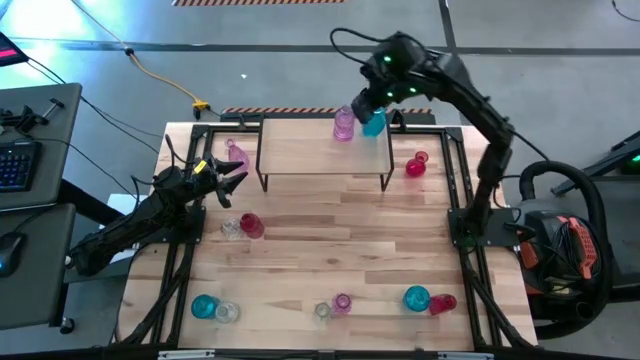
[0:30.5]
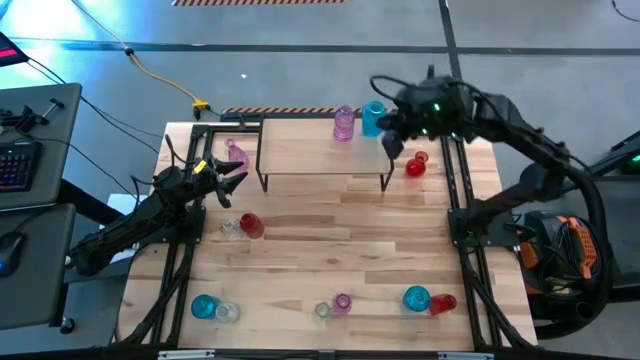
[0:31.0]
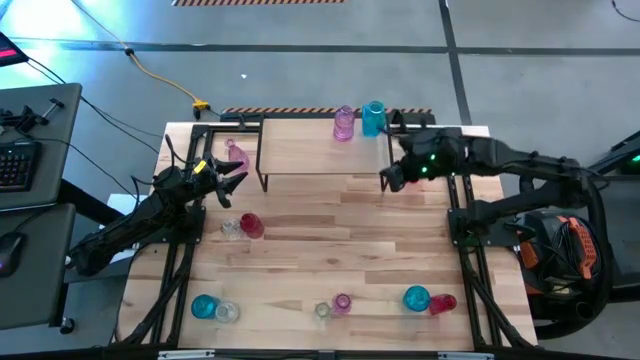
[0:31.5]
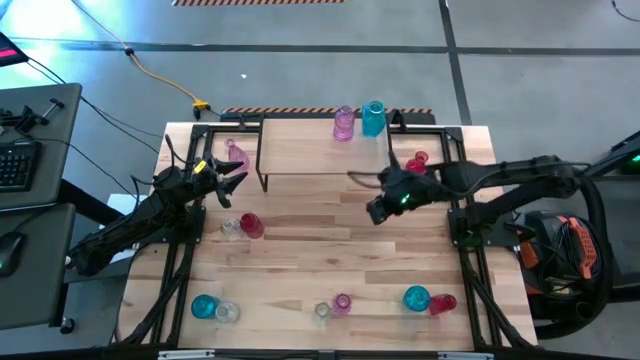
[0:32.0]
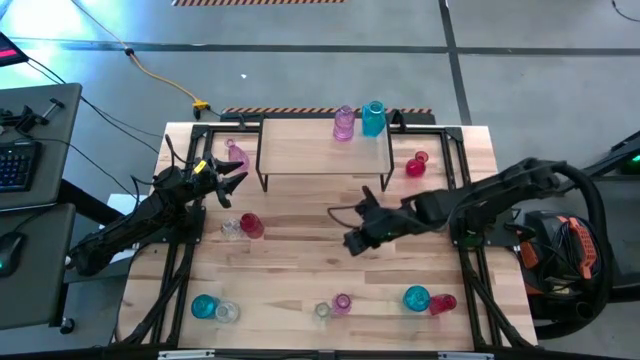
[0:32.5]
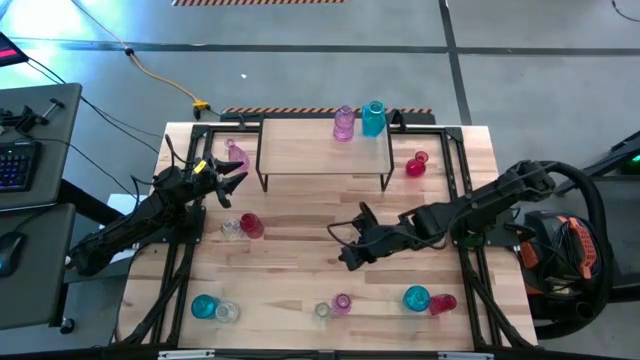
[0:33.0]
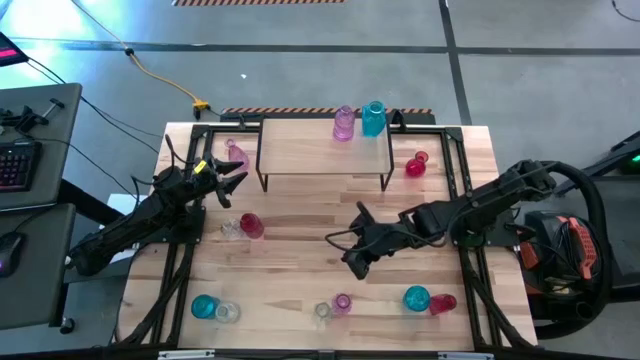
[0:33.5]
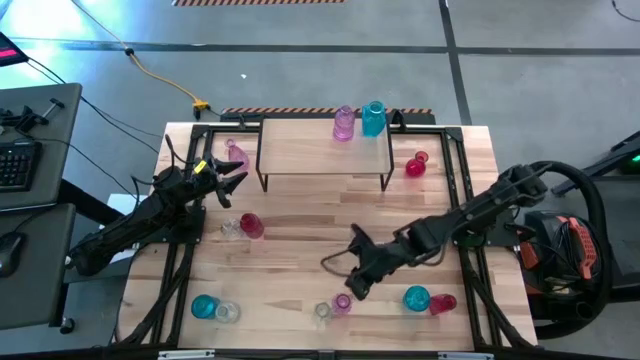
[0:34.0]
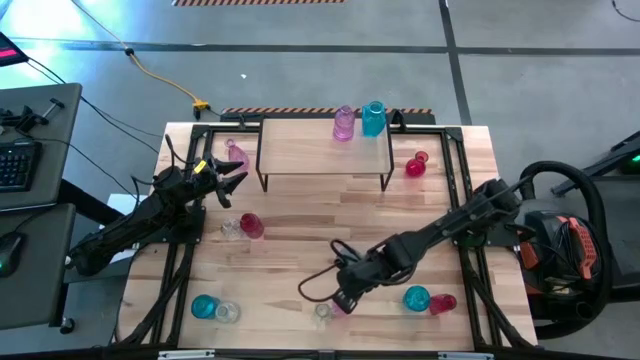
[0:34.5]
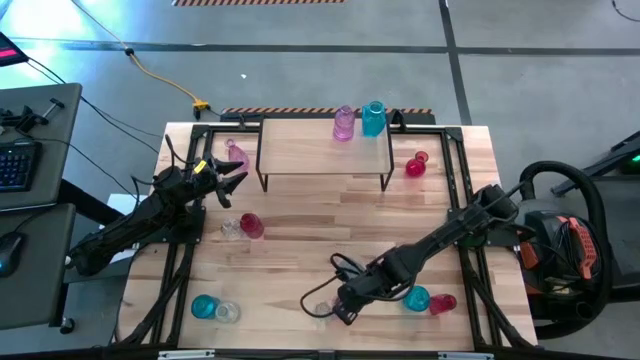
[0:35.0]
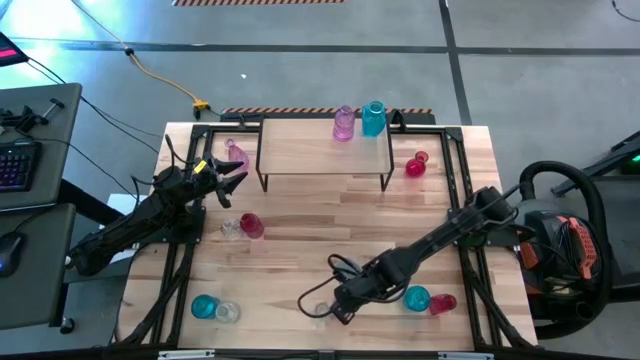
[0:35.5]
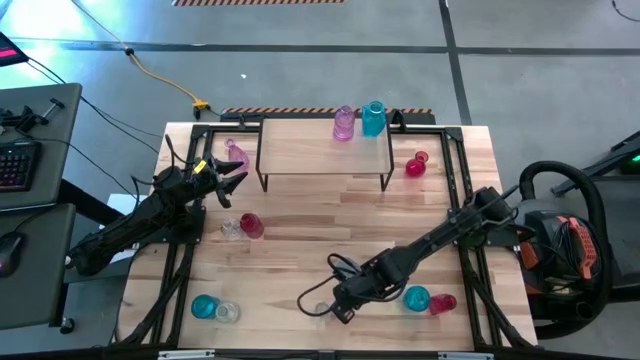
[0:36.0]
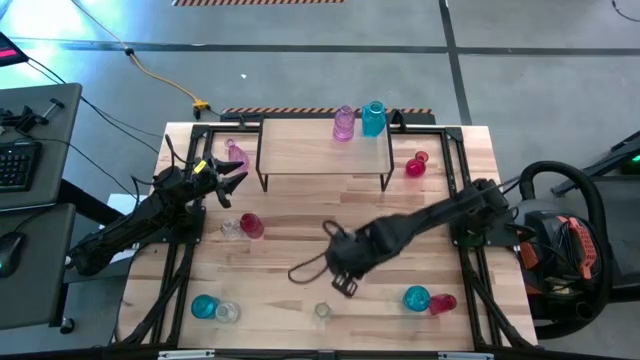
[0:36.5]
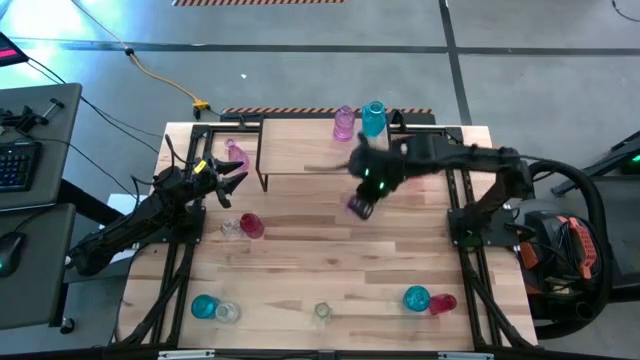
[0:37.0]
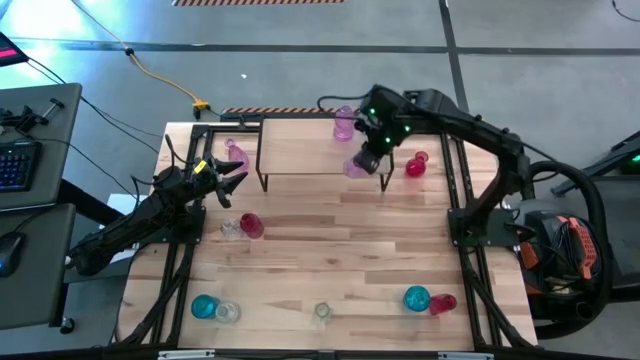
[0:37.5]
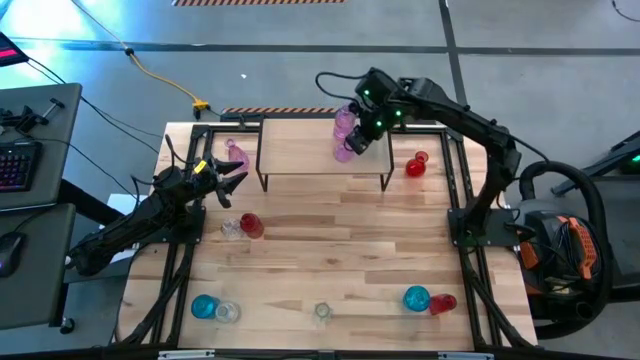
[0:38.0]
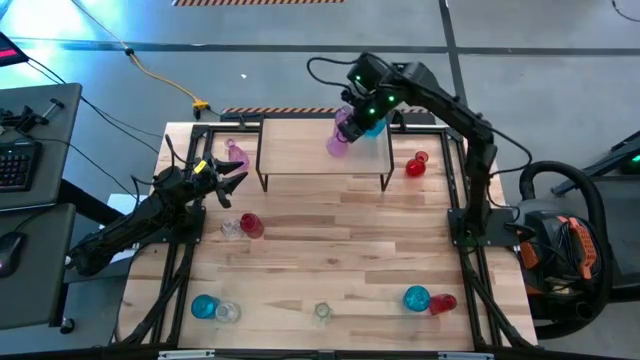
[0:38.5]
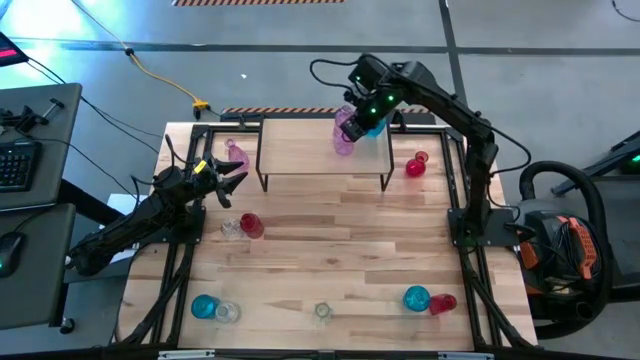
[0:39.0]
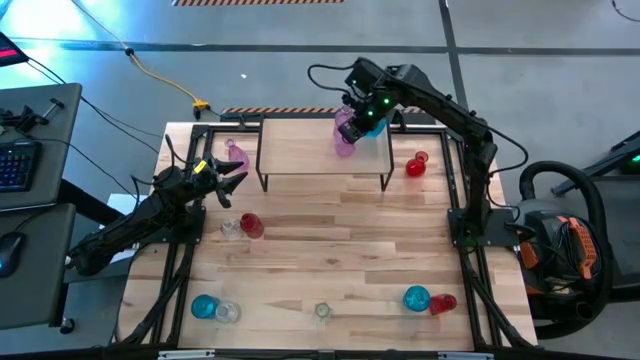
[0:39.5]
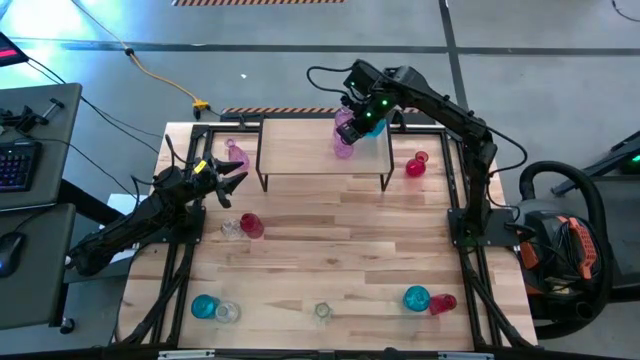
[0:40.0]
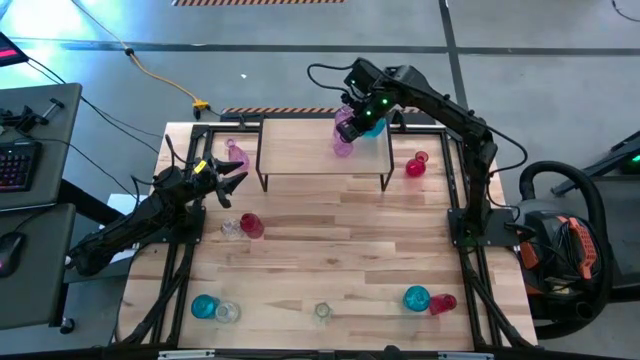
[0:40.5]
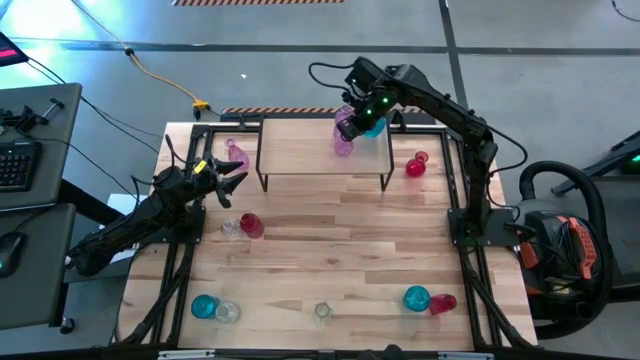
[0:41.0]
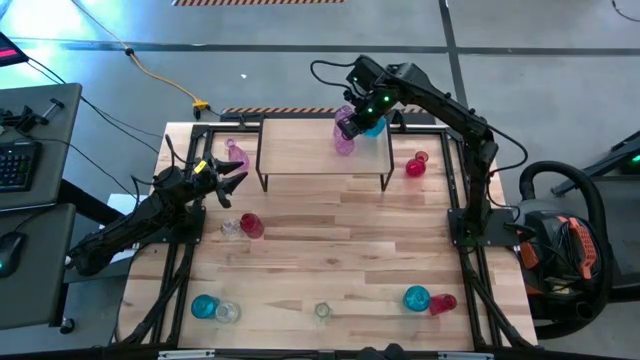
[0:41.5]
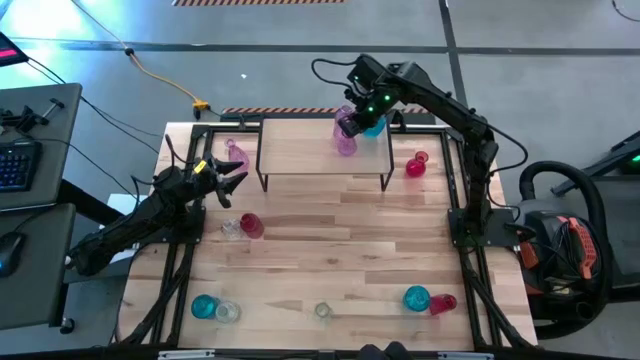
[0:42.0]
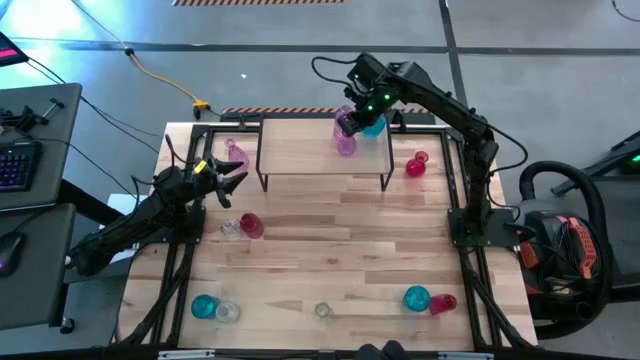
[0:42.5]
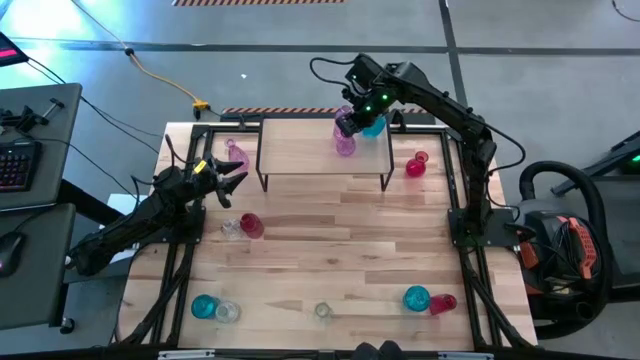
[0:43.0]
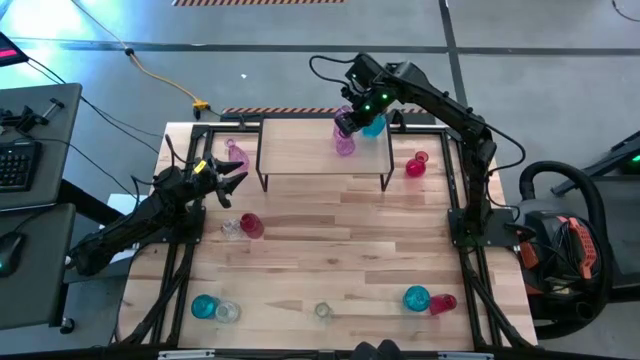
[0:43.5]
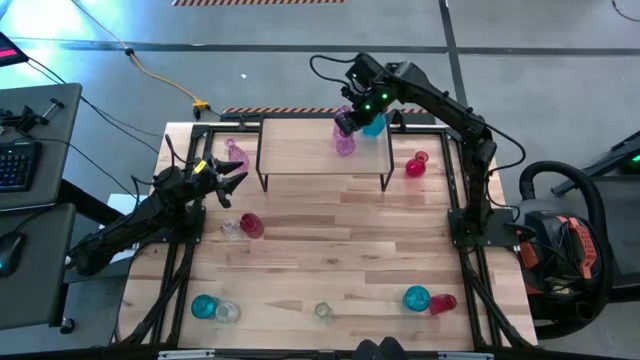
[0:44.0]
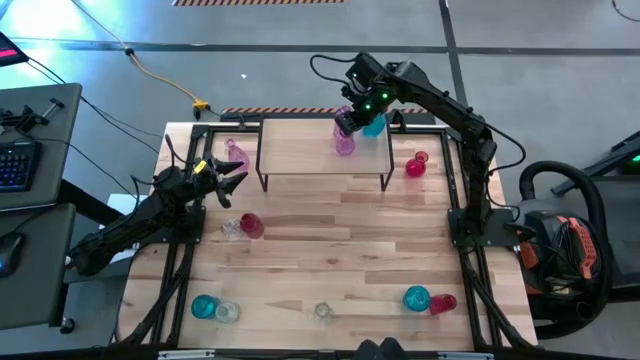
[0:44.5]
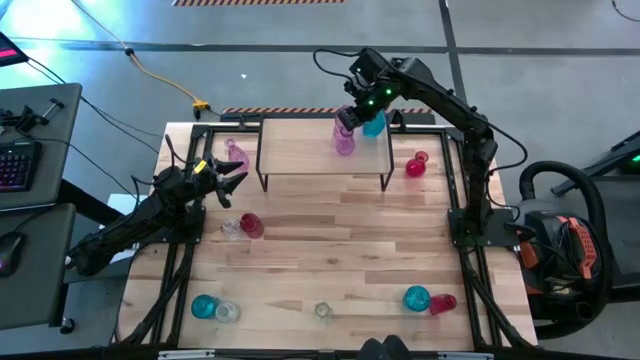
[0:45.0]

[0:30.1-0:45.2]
Task: sort vases onto shelf
Put the bottom violet vase on the shelf aligned with the other violet vase

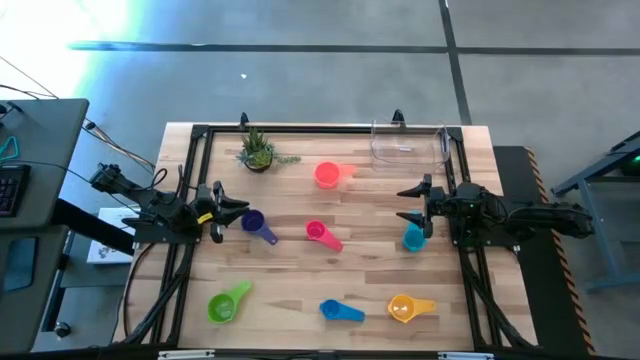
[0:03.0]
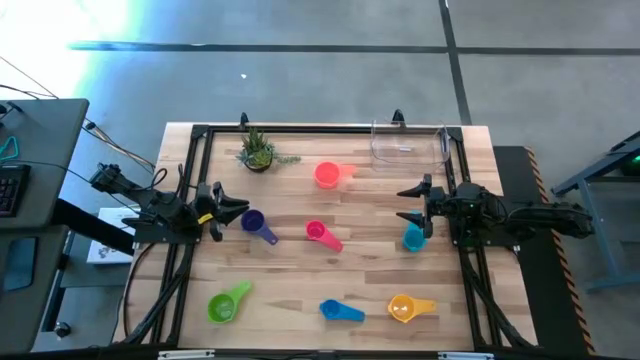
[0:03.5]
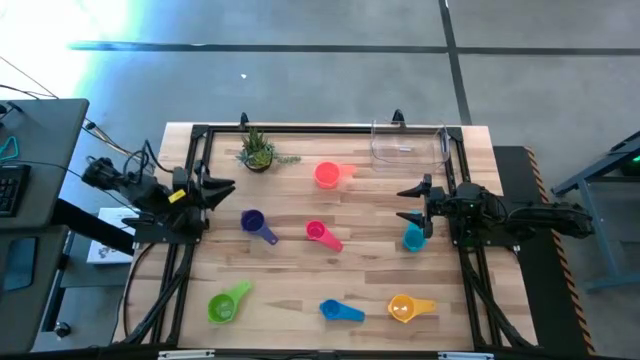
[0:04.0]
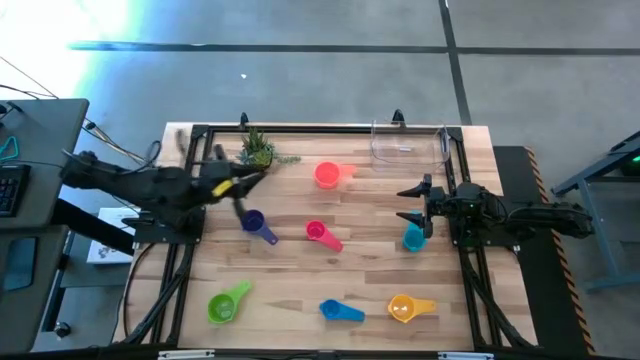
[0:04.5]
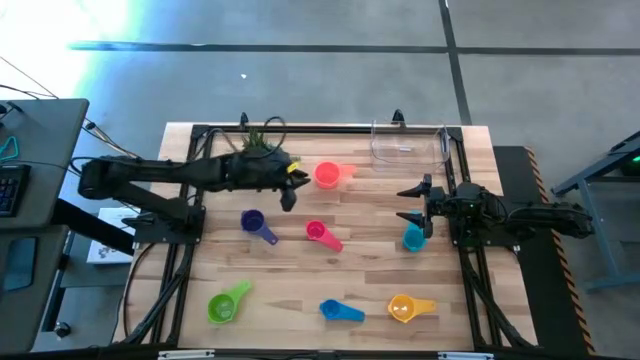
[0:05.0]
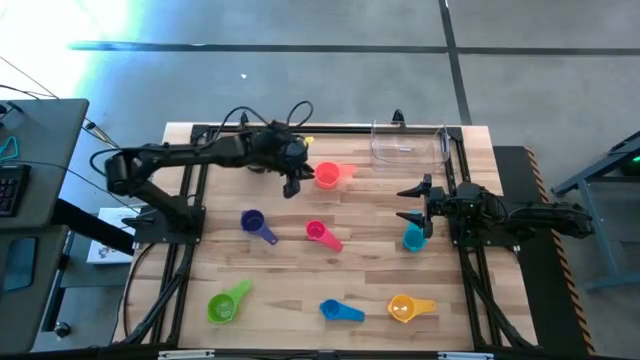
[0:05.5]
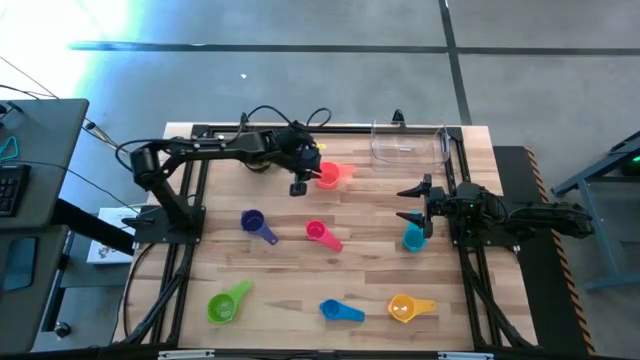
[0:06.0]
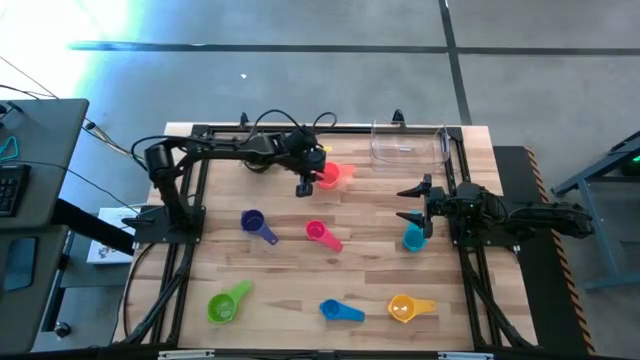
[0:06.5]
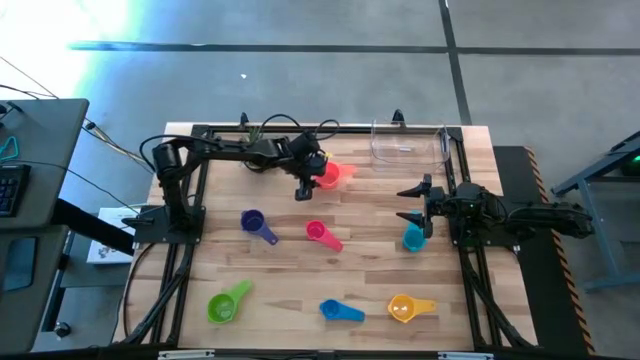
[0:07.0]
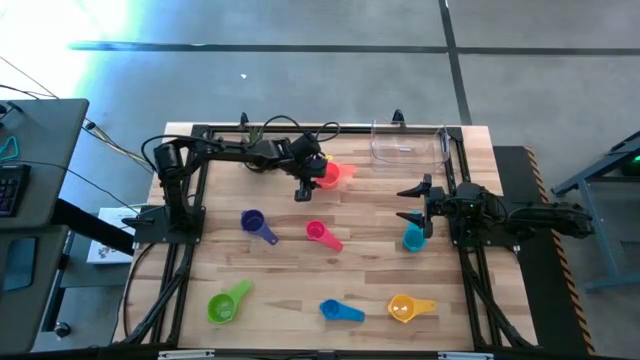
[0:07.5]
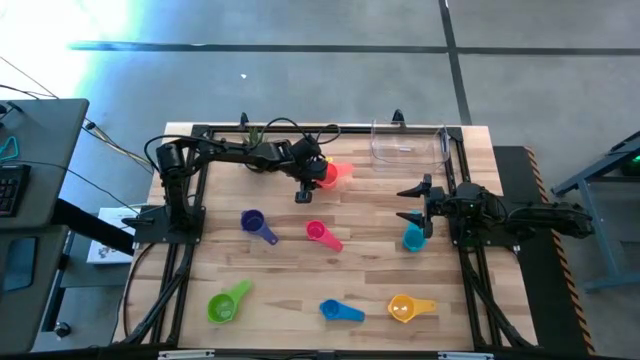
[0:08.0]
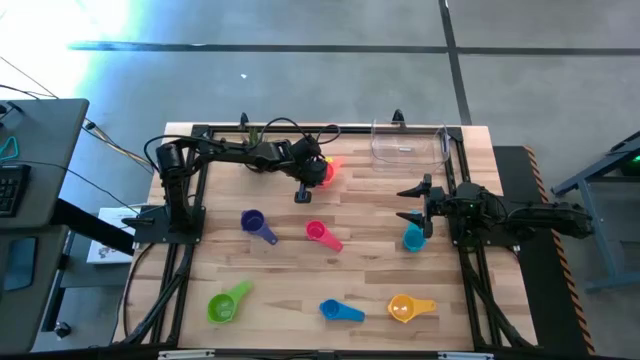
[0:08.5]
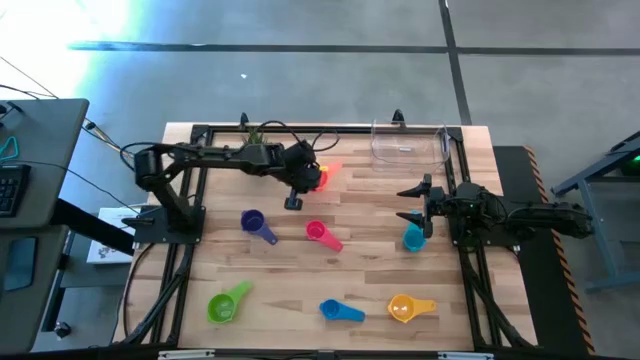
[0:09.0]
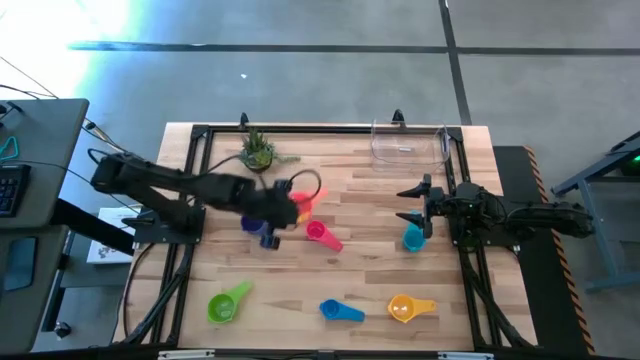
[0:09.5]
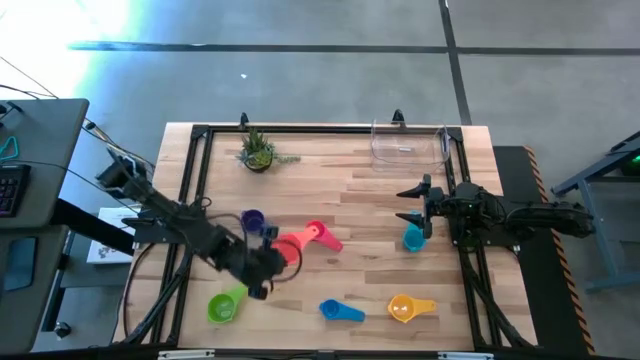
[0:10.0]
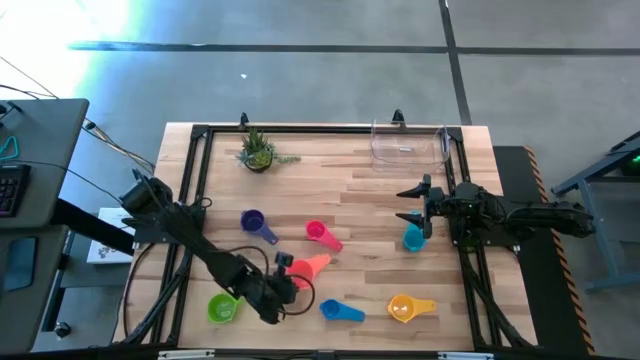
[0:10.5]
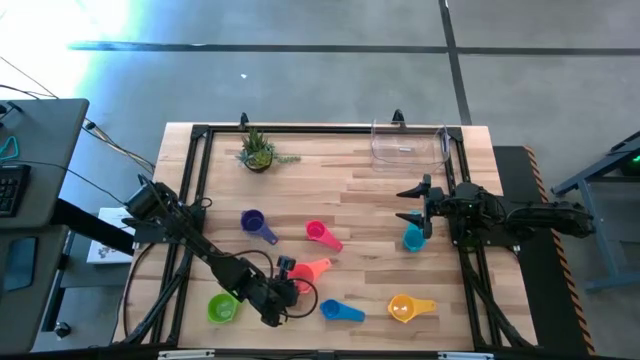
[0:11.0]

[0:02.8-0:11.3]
Task: Nest measuring cups in basket
Move the orange measuring cup to the bottom center of the table
